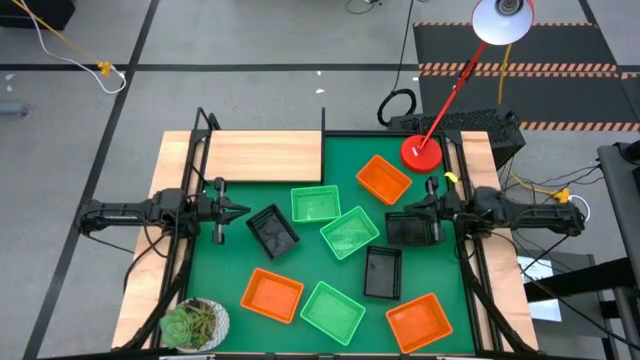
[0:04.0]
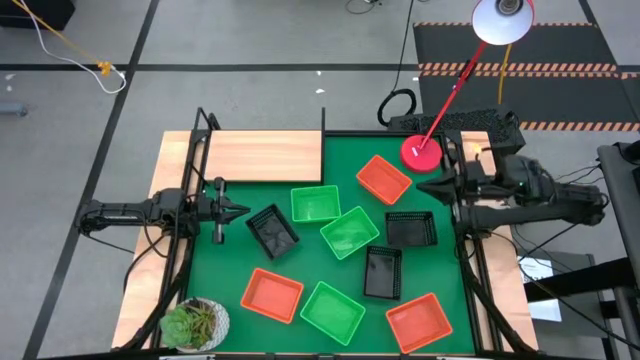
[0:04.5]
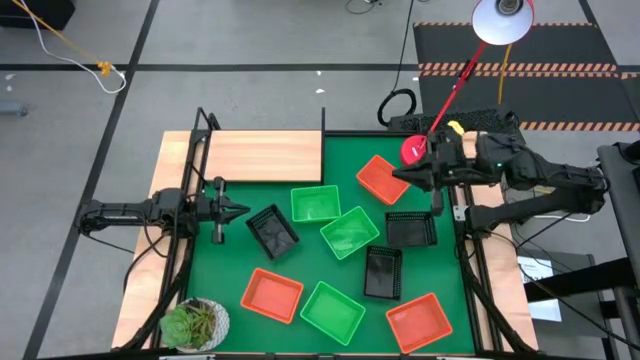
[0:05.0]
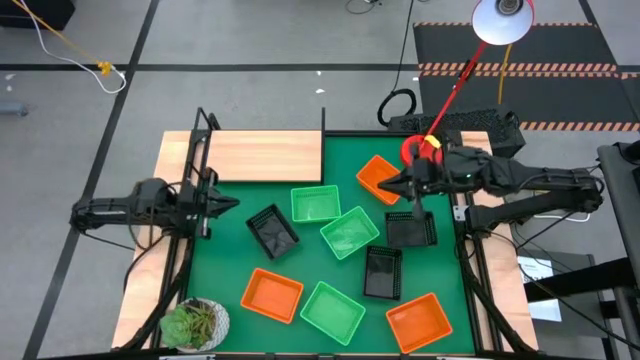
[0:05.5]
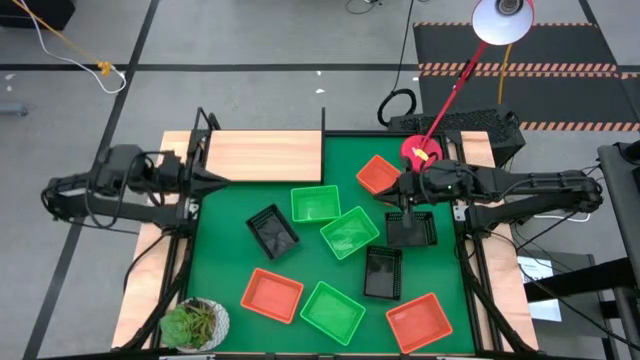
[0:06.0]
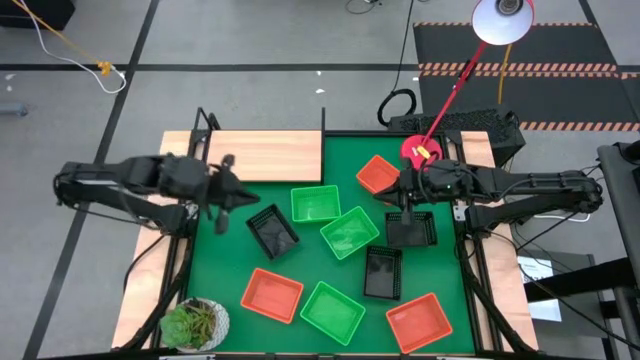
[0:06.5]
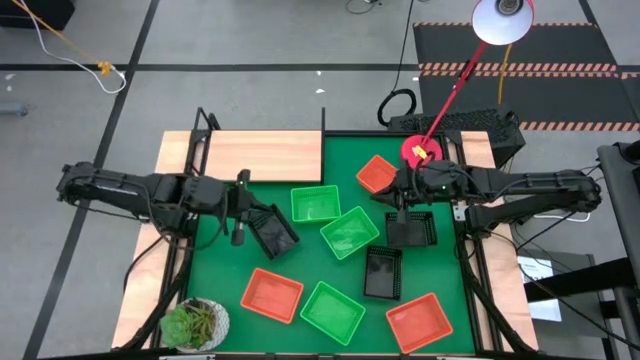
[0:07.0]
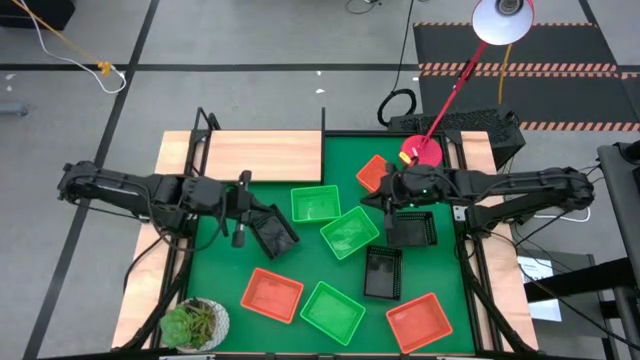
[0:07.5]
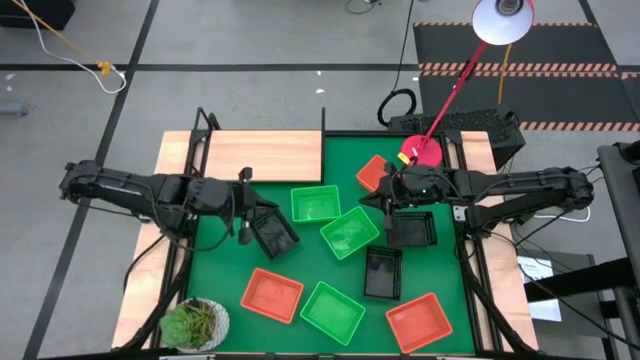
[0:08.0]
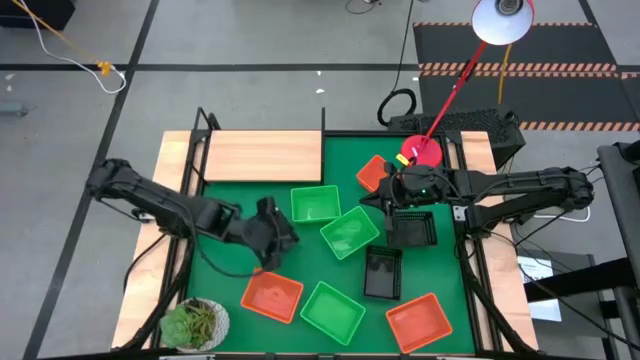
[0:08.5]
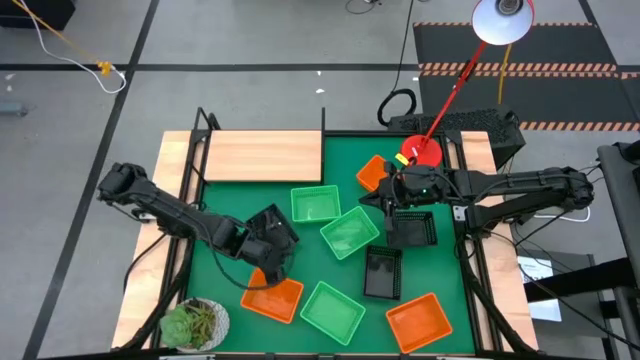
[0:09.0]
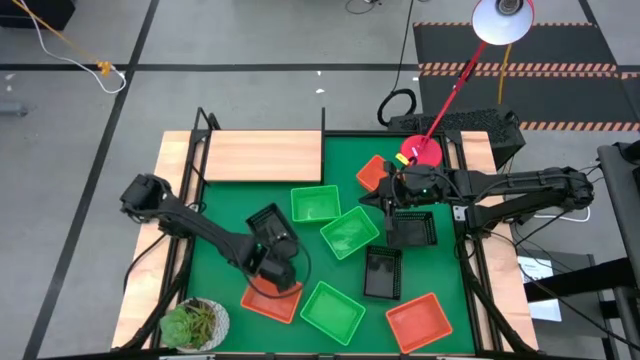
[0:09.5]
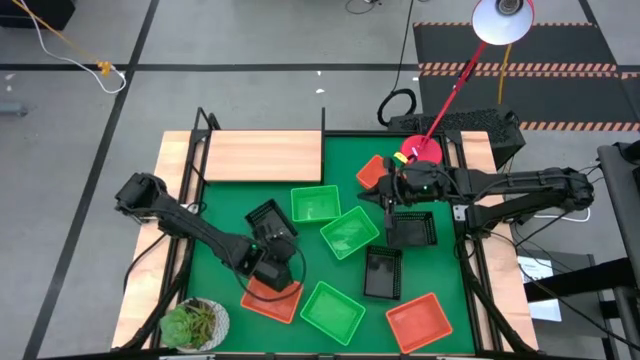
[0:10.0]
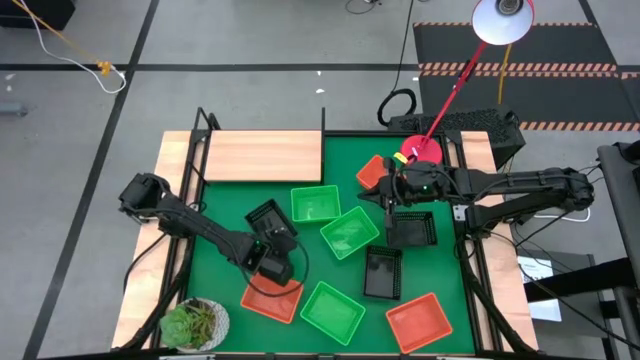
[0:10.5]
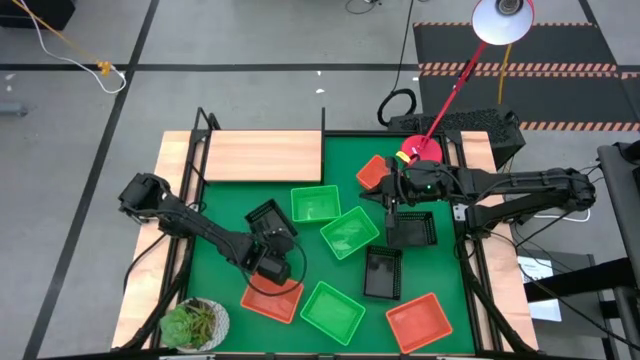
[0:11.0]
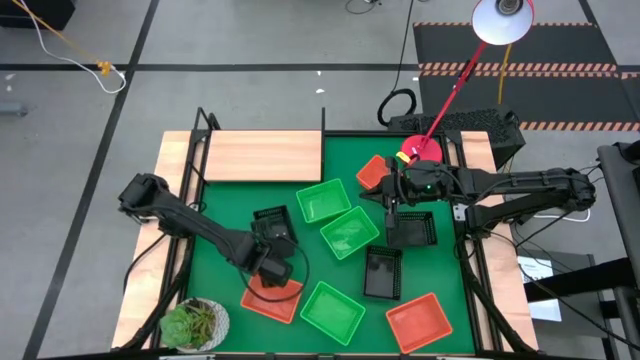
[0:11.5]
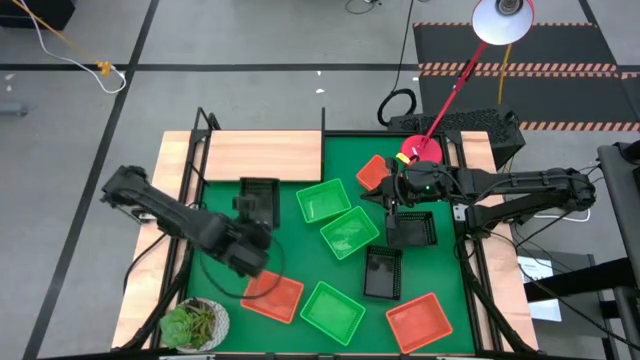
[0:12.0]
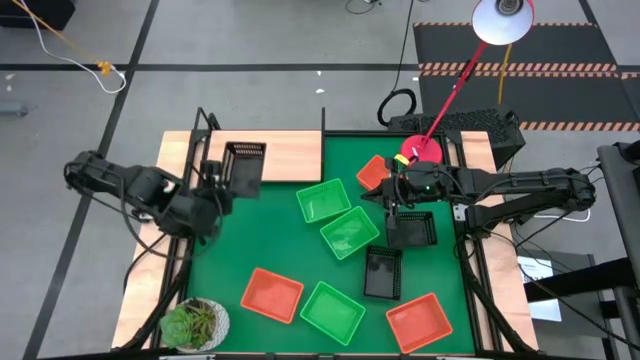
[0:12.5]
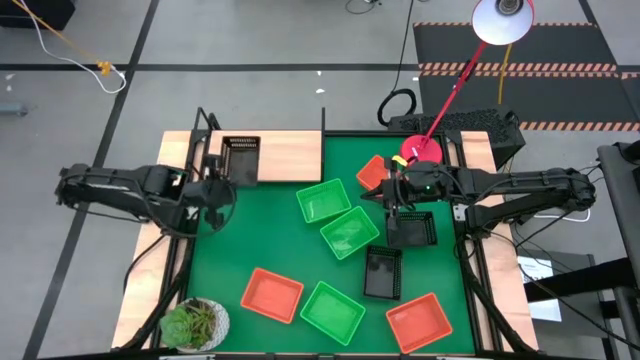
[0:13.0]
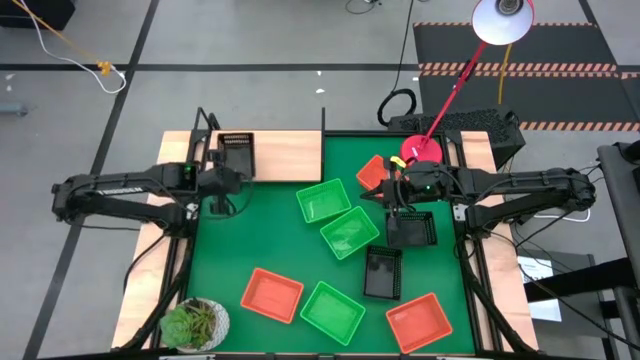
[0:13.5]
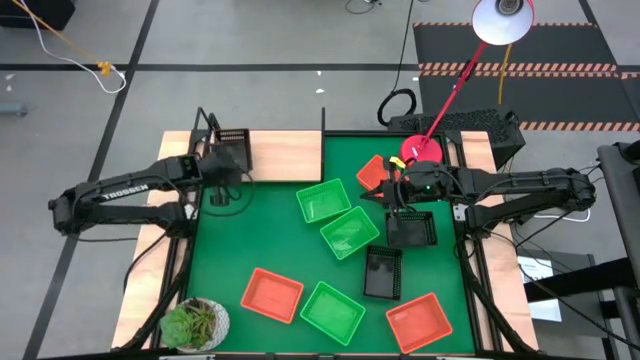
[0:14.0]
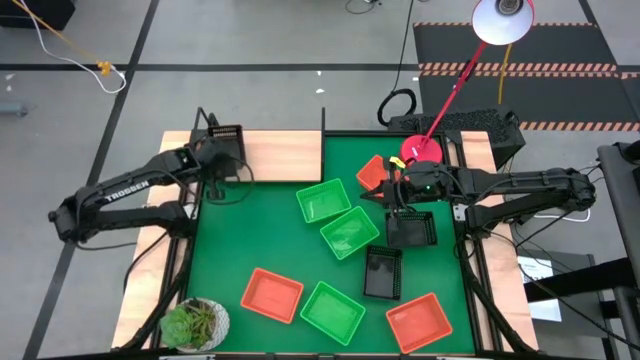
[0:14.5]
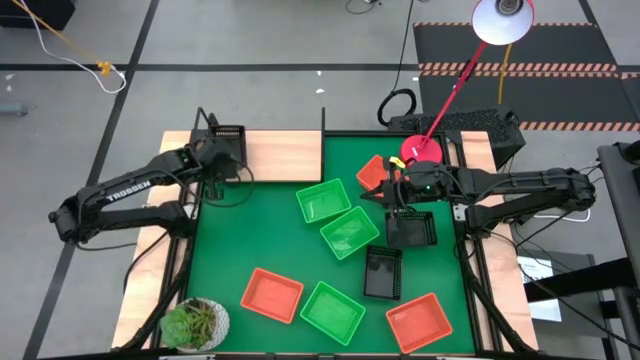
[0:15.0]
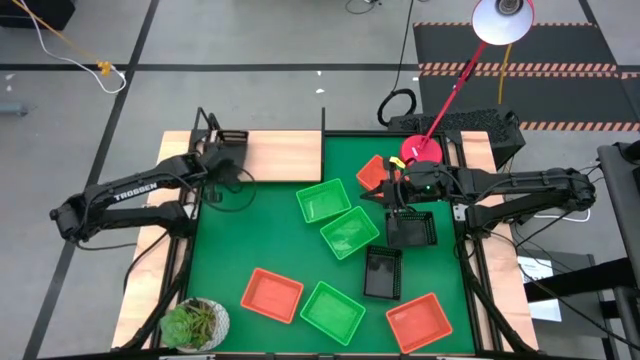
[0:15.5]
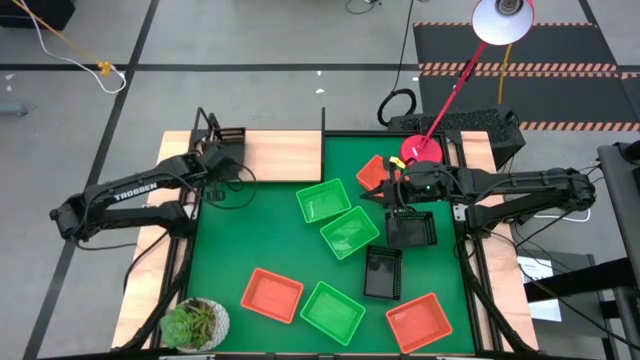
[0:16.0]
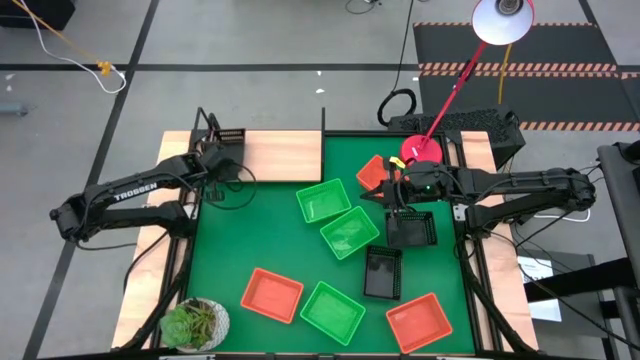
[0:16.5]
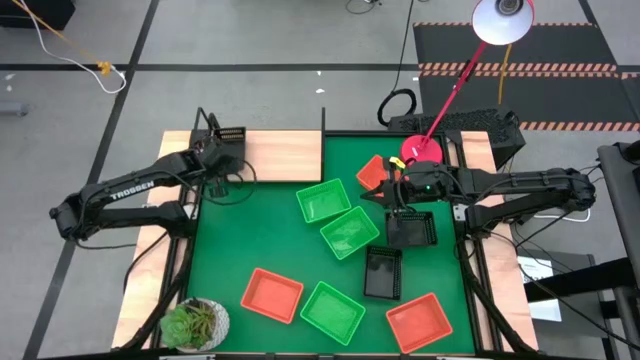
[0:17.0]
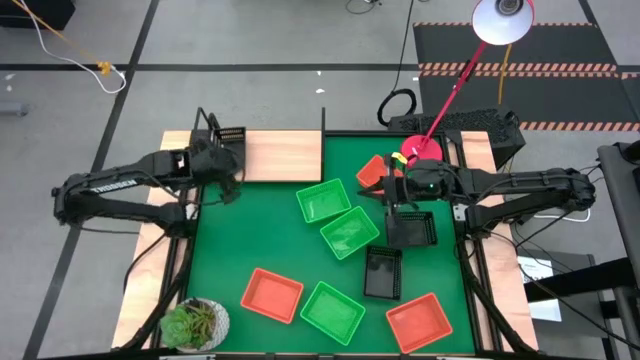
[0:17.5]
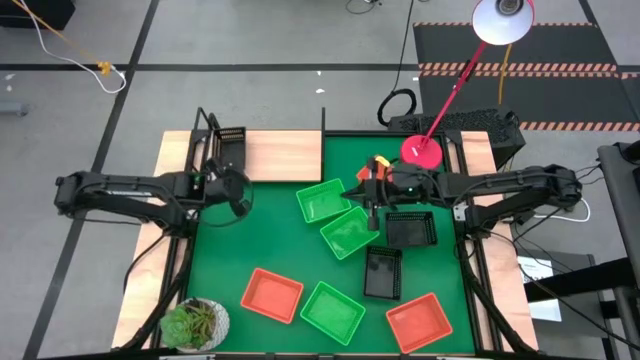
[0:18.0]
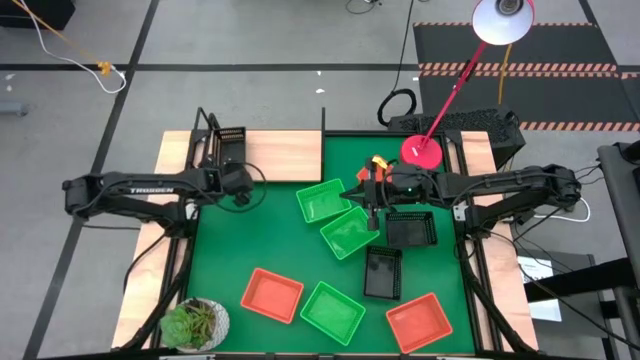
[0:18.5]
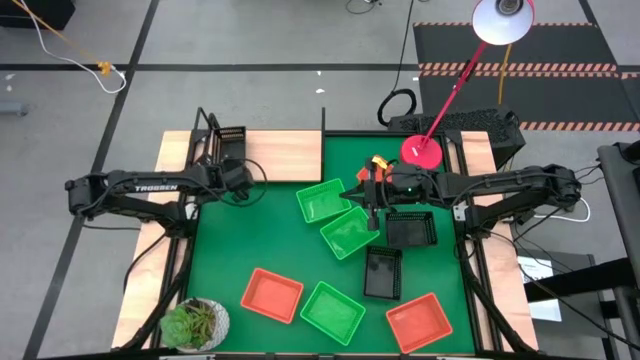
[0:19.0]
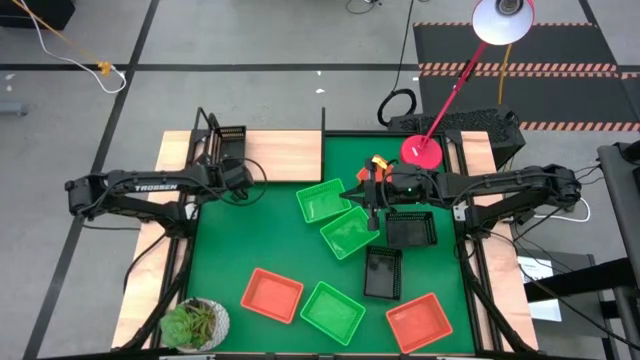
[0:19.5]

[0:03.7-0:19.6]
Task: Stack baskets on shelf by color
Put the black bin on the shelf
